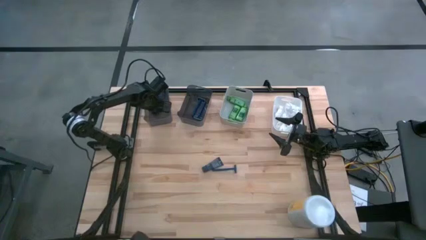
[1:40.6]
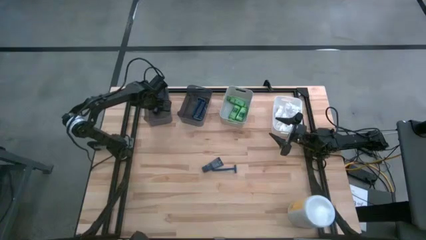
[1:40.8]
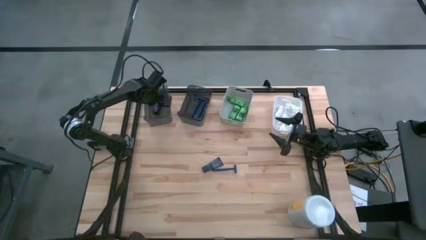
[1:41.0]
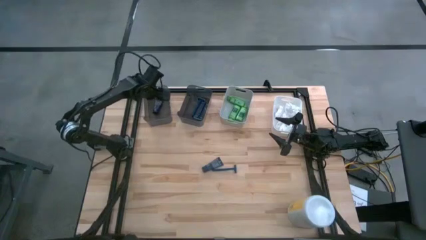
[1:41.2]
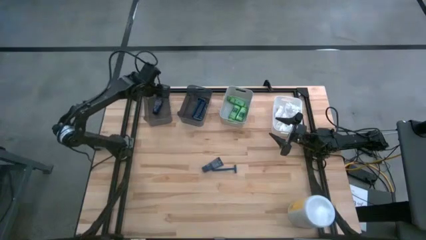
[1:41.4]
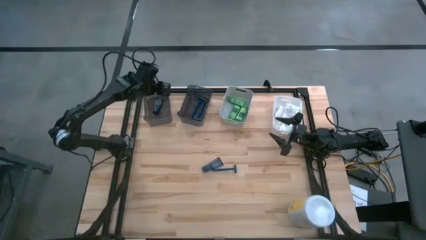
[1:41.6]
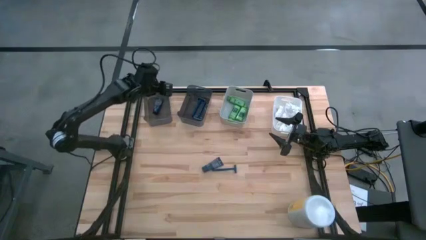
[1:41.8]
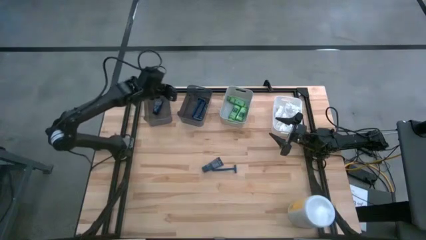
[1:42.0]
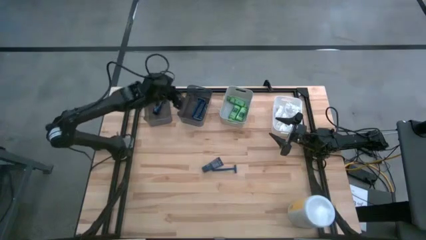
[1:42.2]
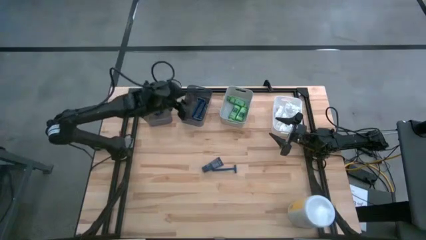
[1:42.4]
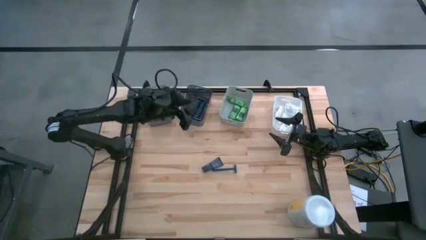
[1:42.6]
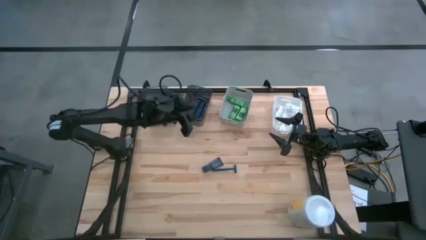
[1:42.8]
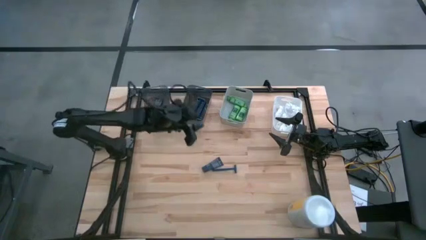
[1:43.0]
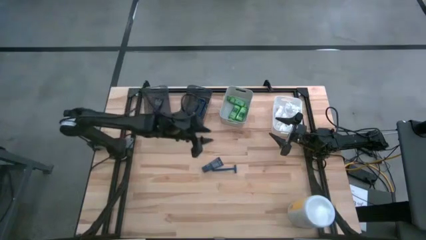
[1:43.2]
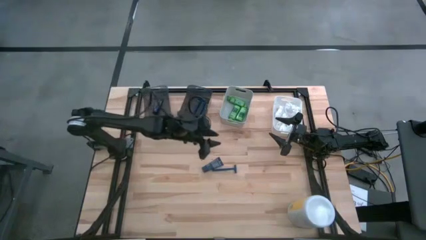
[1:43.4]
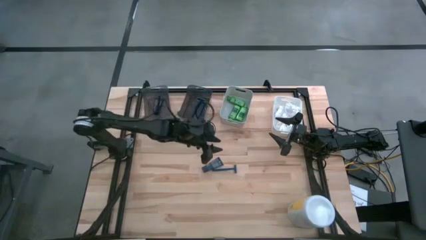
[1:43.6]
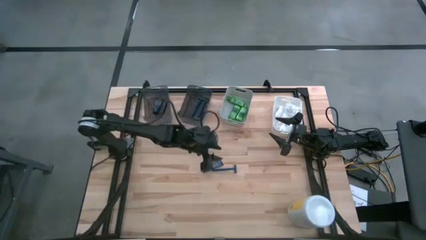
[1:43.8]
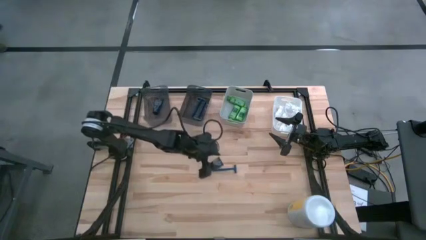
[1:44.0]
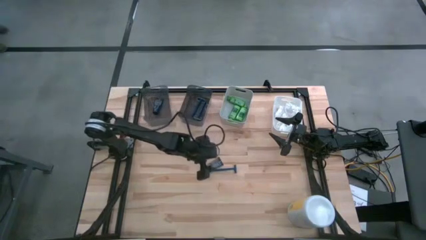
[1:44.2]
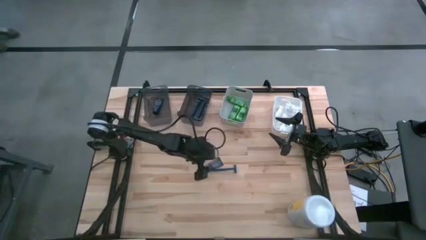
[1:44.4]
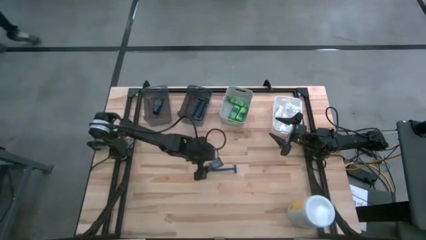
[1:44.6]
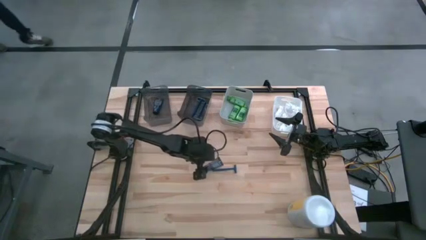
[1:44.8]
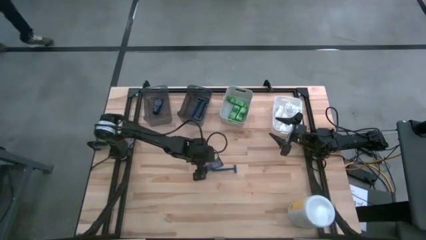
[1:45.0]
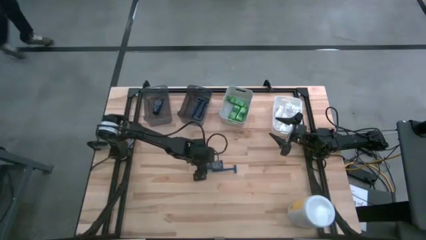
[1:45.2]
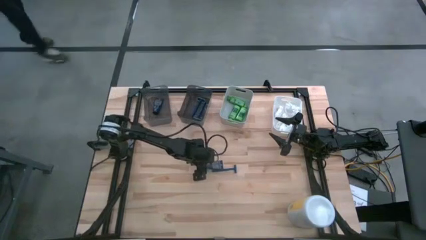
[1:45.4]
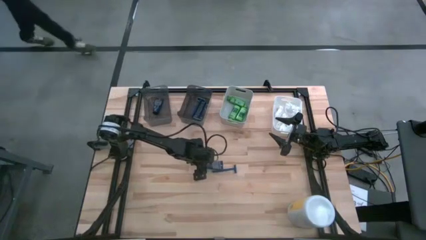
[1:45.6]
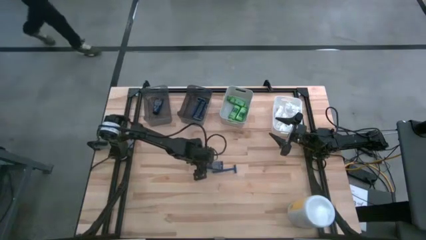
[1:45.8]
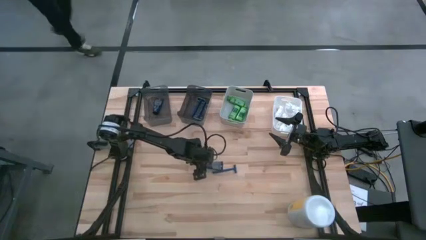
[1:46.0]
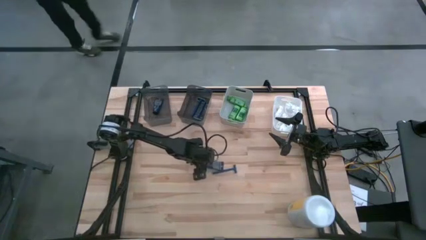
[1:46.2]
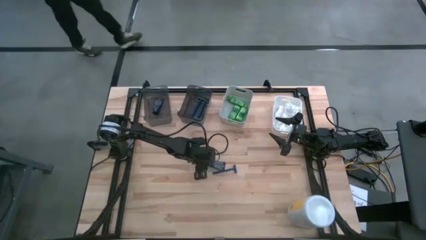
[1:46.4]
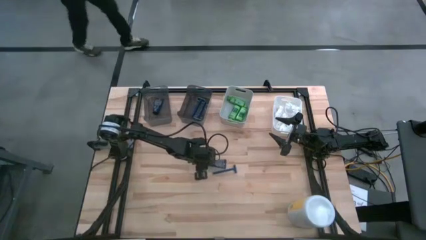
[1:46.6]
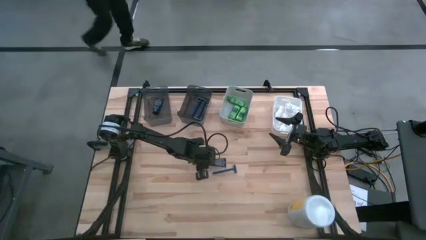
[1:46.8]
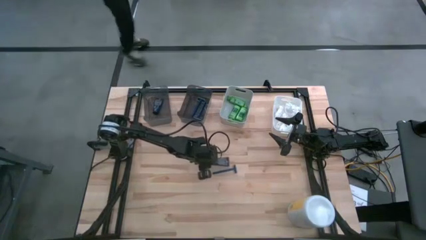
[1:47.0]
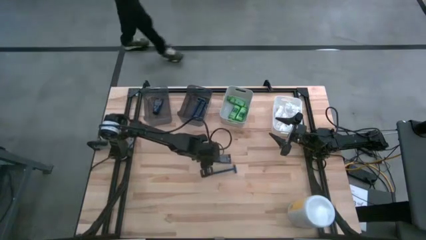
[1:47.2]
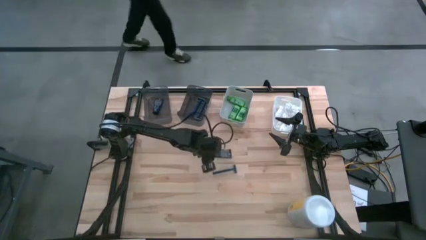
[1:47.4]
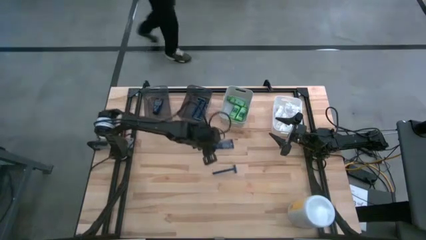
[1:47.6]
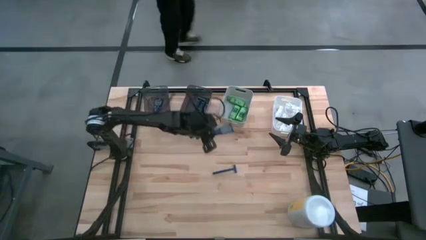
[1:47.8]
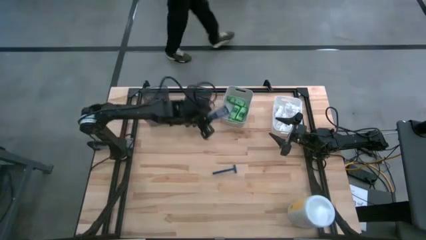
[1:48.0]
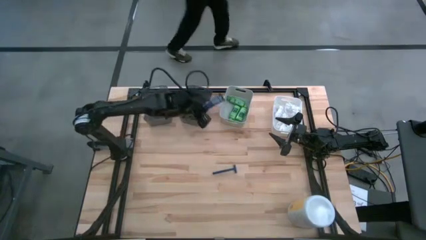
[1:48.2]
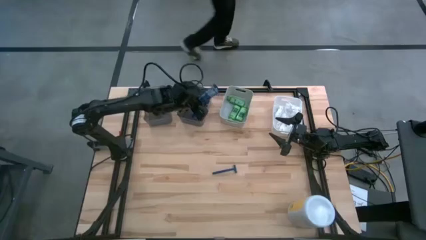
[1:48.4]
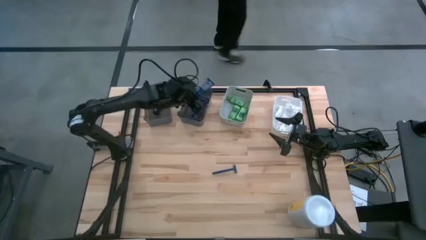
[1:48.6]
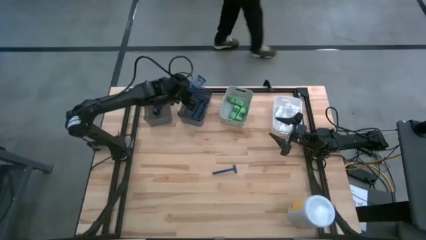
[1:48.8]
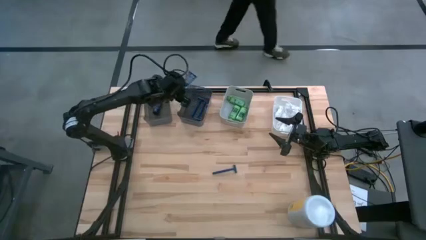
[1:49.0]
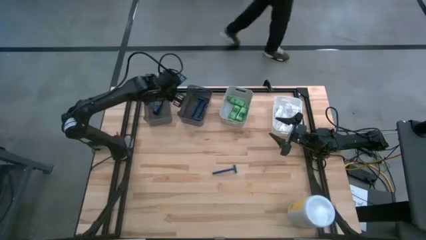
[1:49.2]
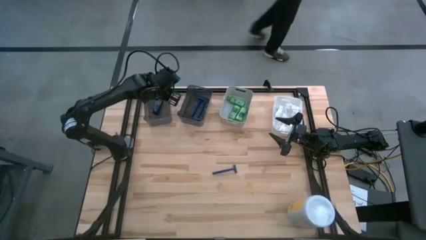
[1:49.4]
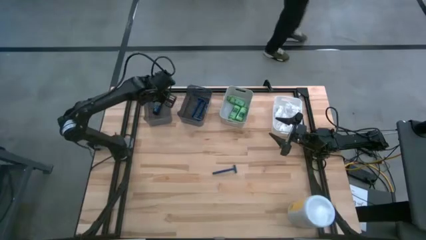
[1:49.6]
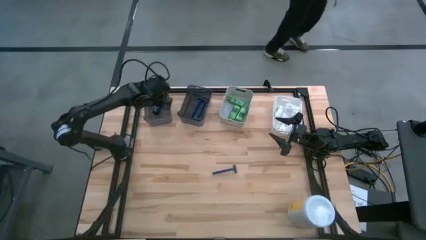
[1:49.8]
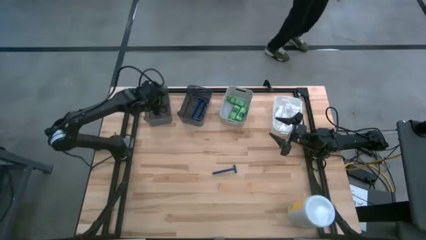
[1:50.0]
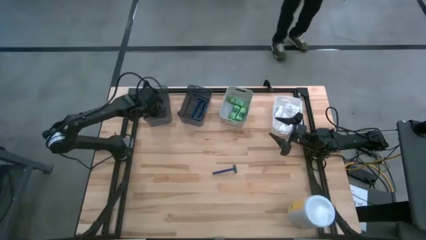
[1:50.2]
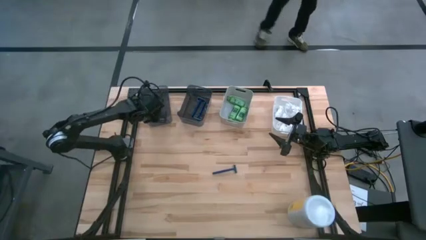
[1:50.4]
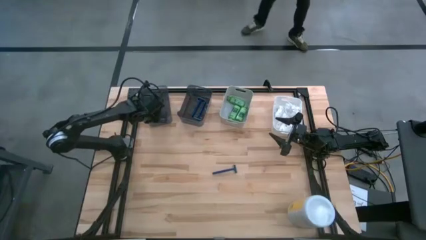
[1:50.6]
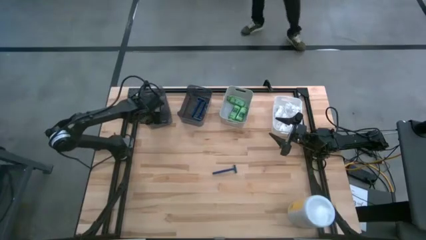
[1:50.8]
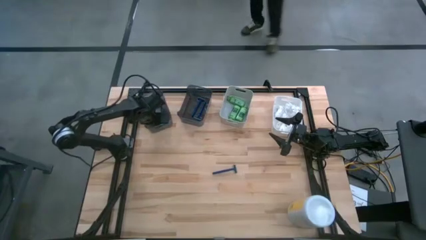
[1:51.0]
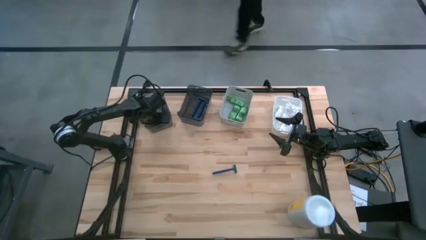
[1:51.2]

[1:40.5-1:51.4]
Task: Pick & Place Travel size toiletries
Put the blue shave cream into the left black bin

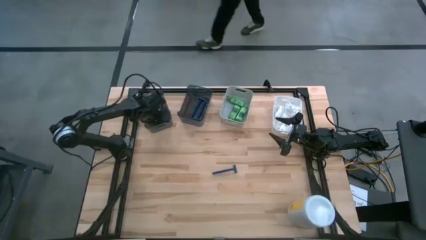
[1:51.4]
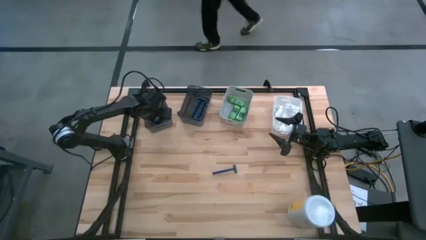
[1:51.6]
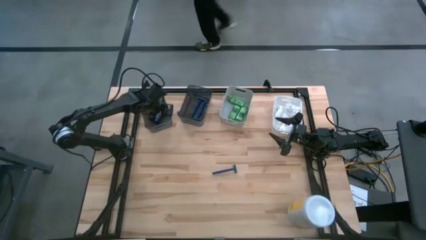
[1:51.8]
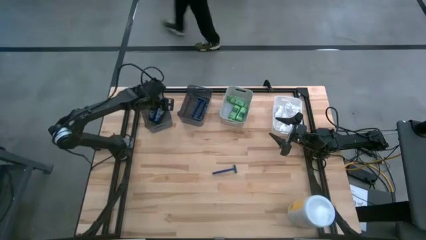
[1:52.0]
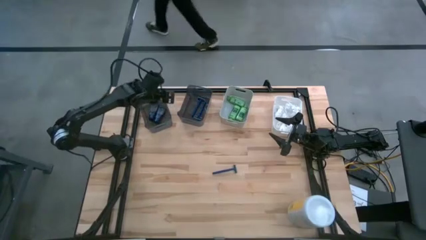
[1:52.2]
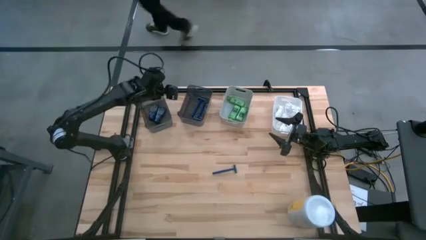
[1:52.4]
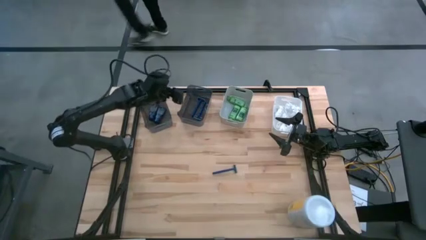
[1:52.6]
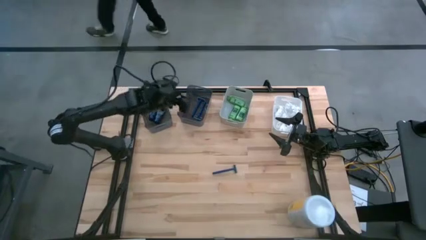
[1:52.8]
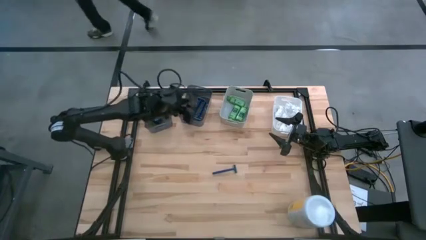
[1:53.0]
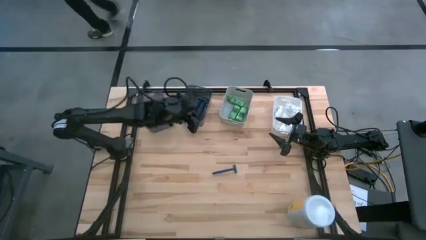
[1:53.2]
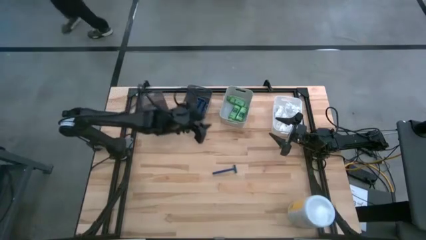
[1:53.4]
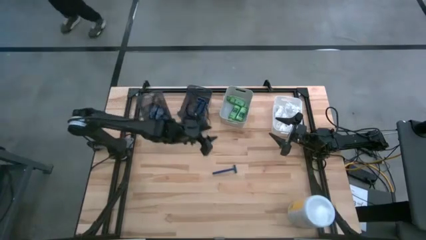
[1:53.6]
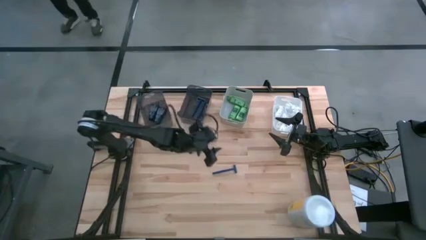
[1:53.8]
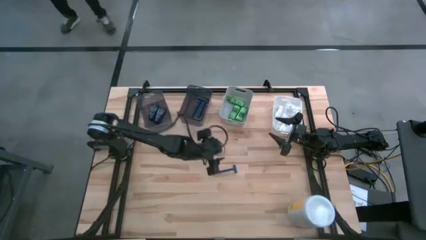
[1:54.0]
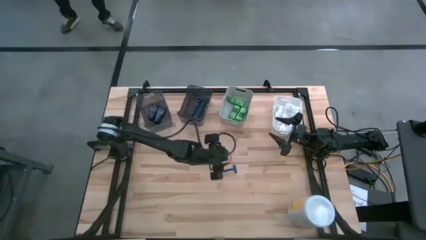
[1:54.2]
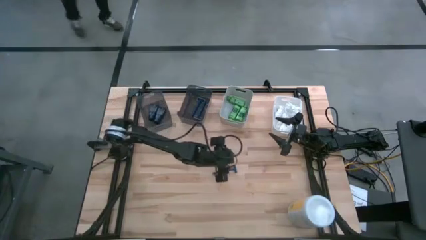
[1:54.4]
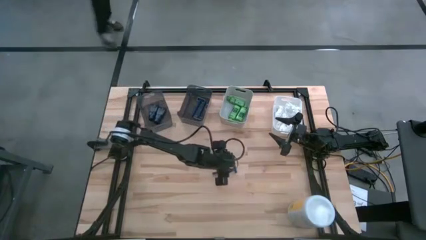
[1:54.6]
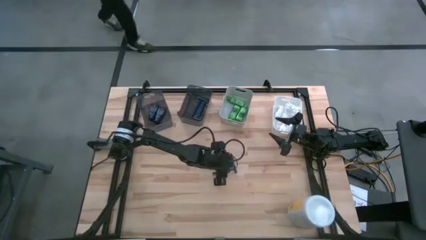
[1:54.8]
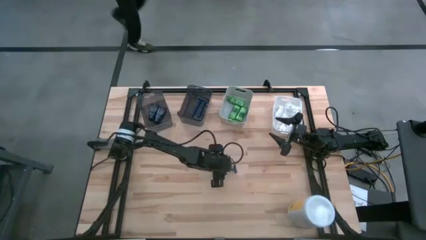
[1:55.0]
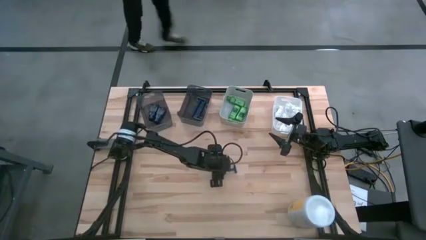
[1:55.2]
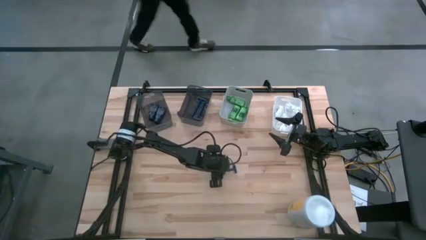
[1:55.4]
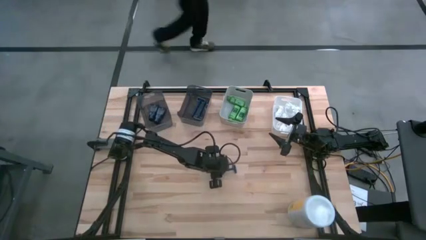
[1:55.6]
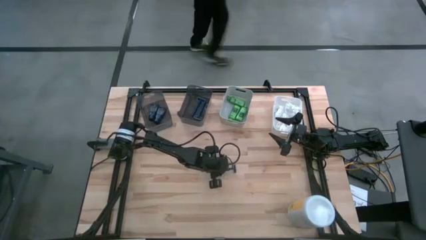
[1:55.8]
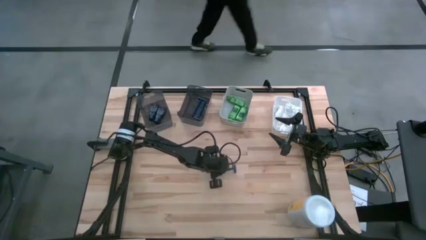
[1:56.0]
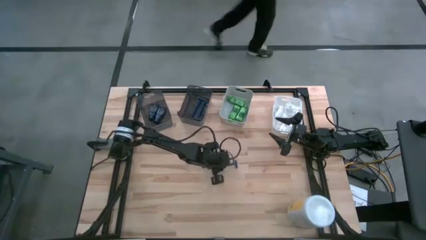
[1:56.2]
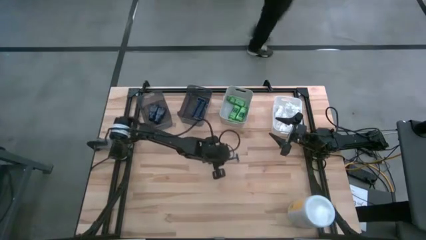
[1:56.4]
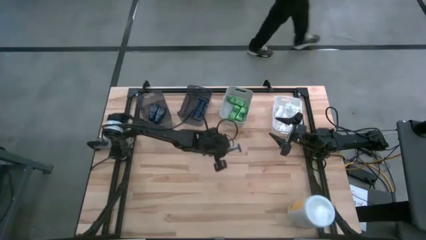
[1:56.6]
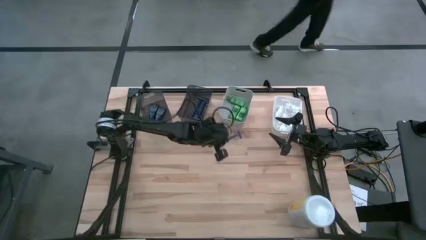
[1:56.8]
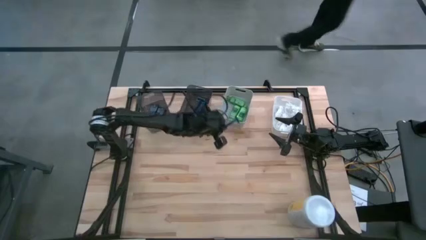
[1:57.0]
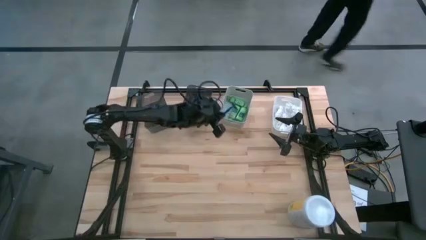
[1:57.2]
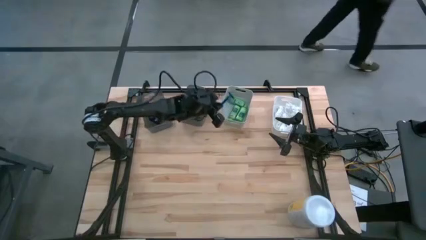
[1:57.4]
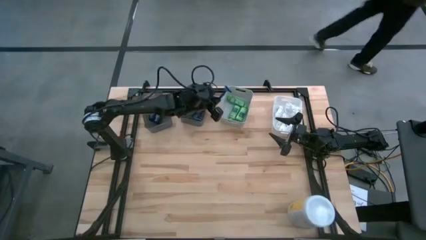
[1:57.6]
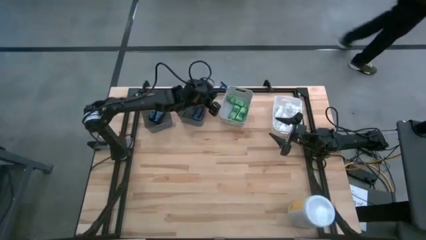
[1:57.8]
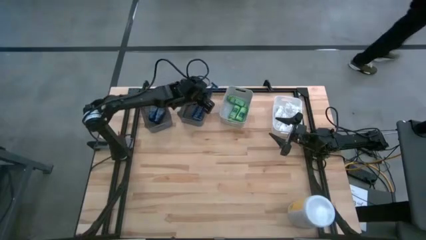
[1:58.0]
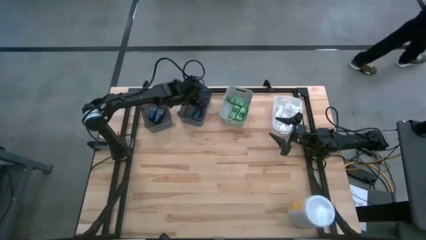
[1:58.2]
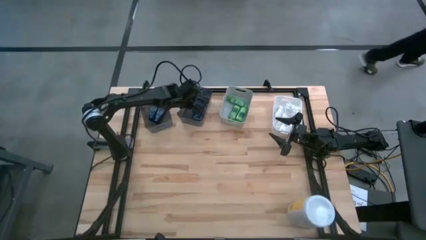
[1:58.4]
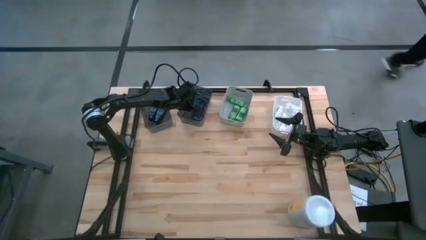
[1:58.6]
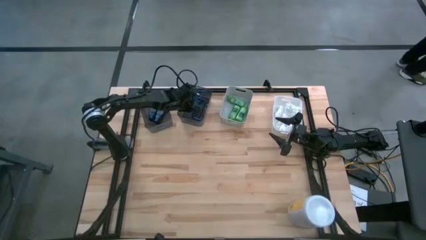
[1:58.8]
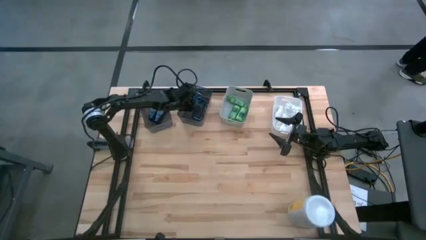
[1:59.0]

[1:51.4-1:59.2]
Put the blue razor into the right black bin
